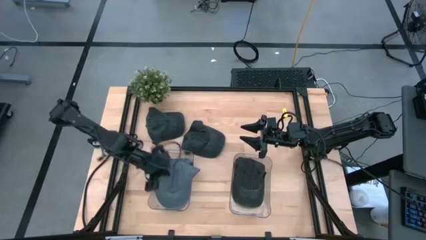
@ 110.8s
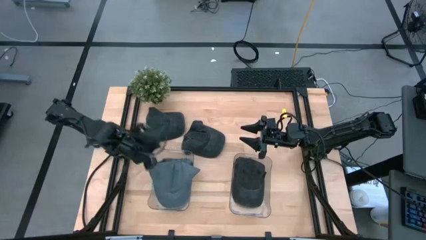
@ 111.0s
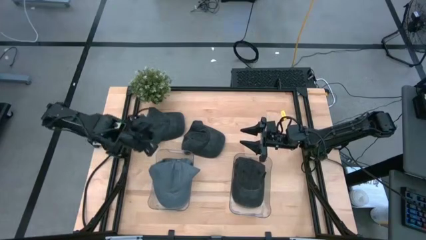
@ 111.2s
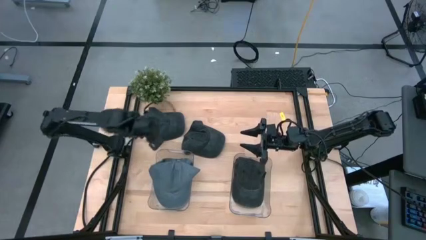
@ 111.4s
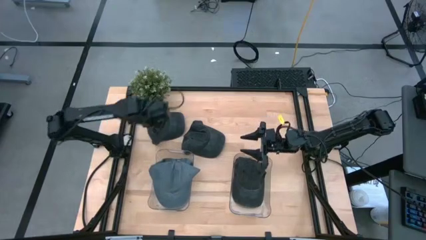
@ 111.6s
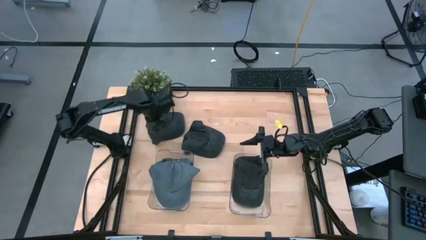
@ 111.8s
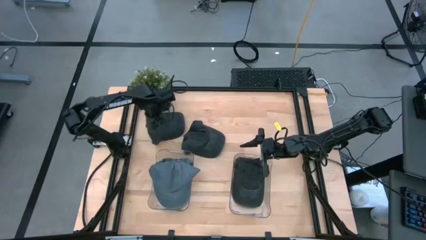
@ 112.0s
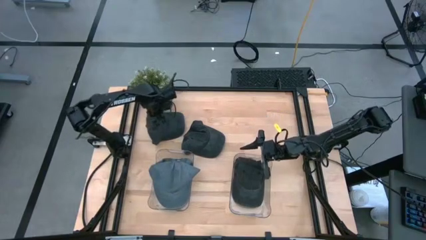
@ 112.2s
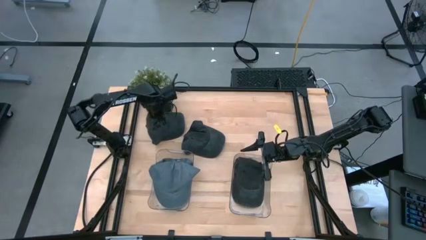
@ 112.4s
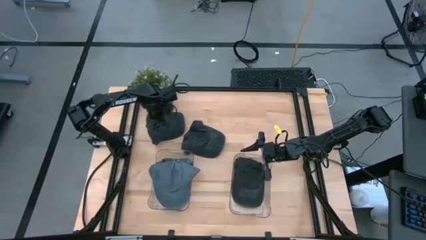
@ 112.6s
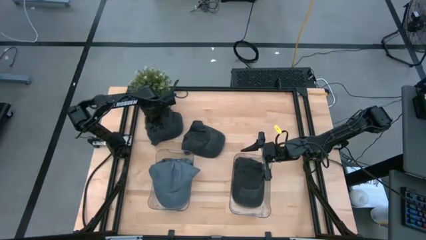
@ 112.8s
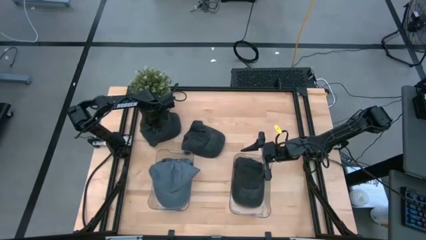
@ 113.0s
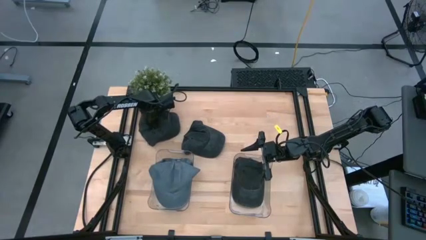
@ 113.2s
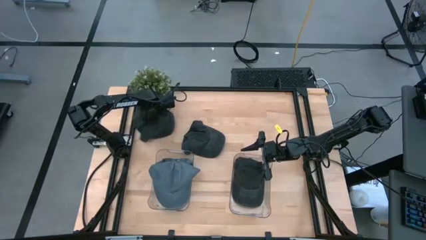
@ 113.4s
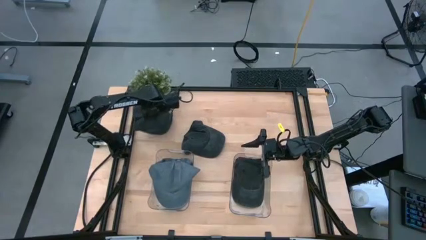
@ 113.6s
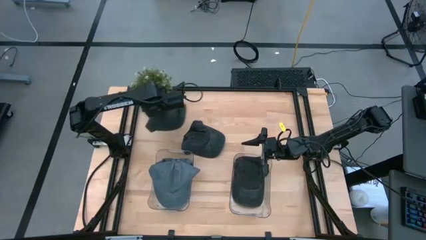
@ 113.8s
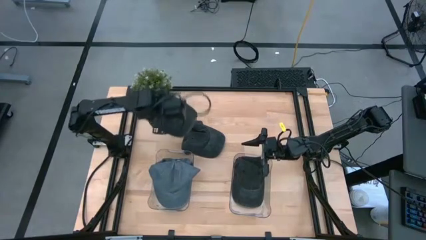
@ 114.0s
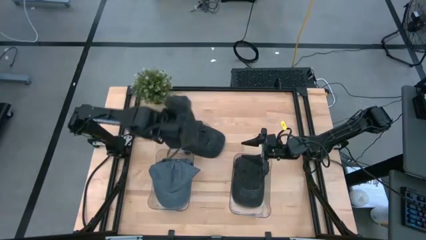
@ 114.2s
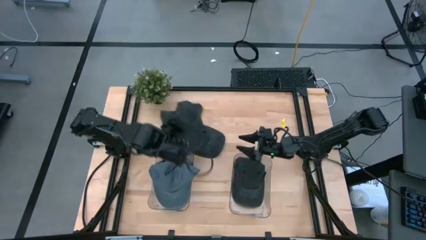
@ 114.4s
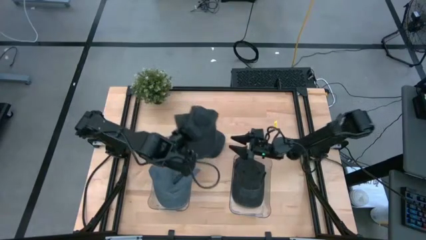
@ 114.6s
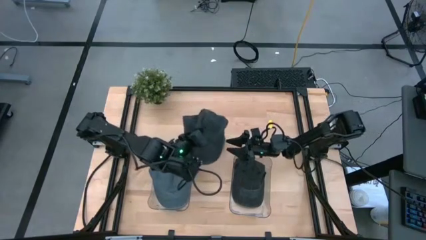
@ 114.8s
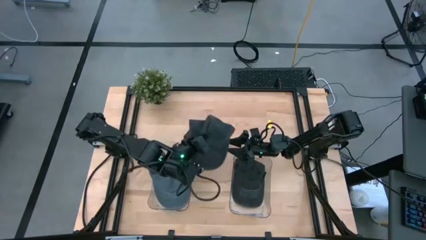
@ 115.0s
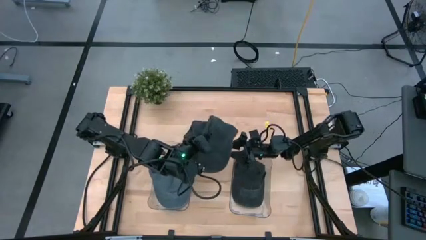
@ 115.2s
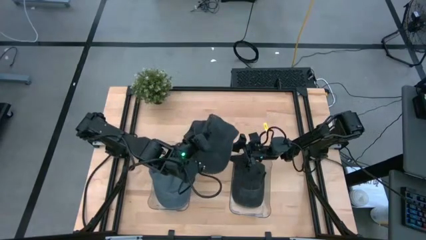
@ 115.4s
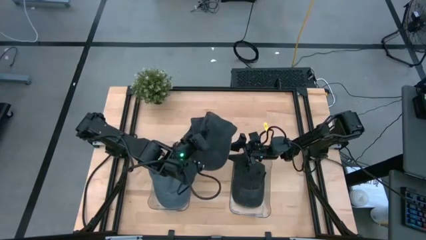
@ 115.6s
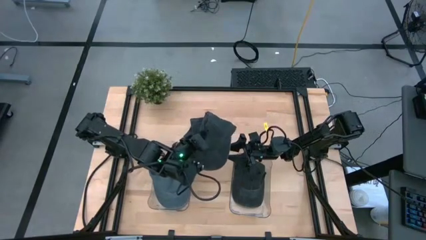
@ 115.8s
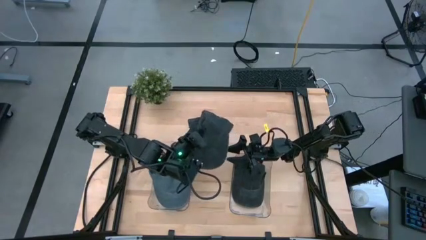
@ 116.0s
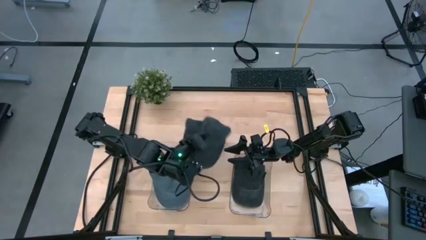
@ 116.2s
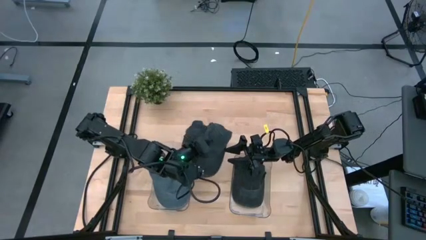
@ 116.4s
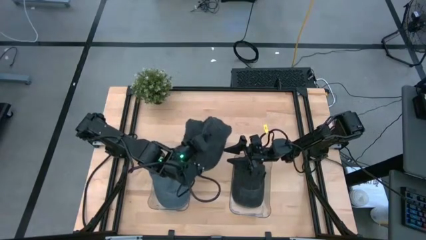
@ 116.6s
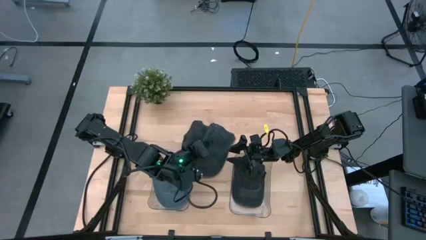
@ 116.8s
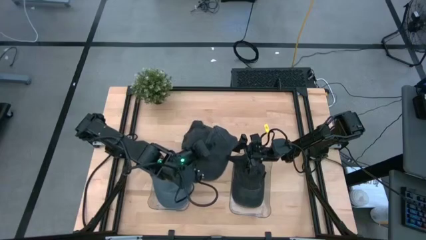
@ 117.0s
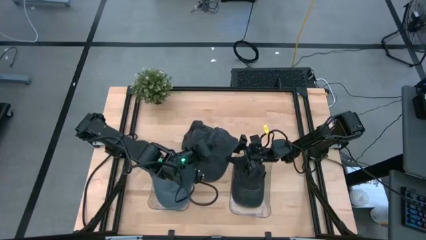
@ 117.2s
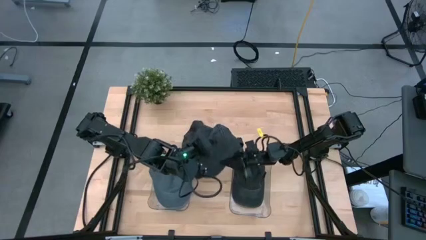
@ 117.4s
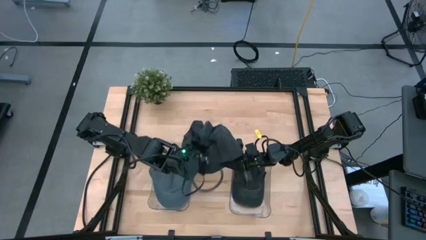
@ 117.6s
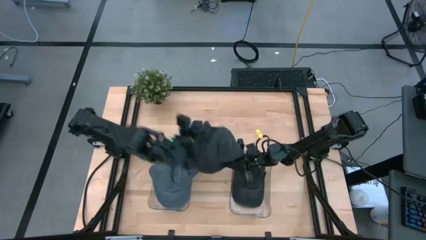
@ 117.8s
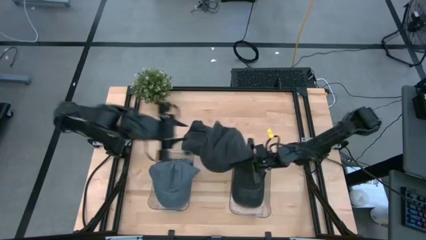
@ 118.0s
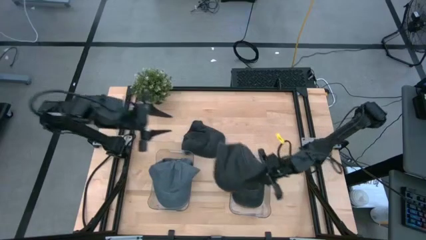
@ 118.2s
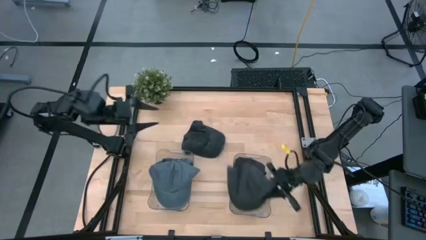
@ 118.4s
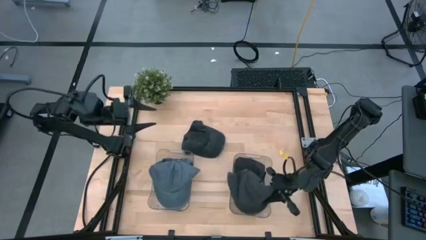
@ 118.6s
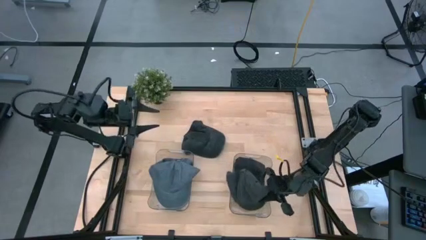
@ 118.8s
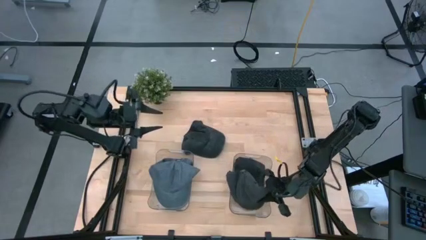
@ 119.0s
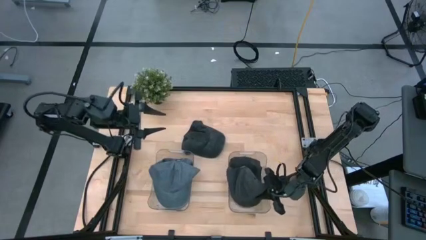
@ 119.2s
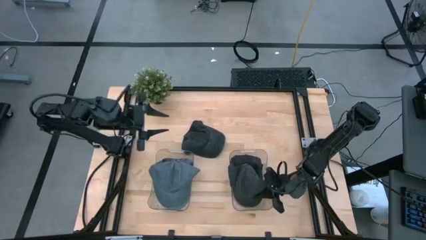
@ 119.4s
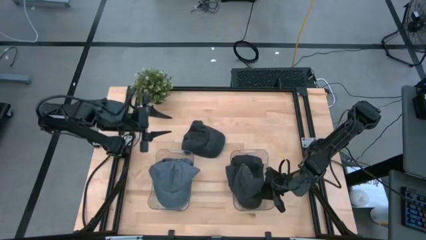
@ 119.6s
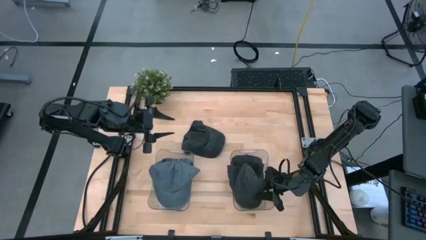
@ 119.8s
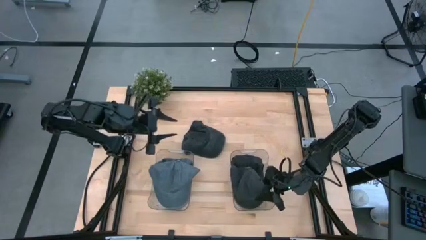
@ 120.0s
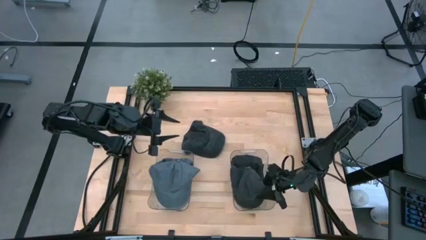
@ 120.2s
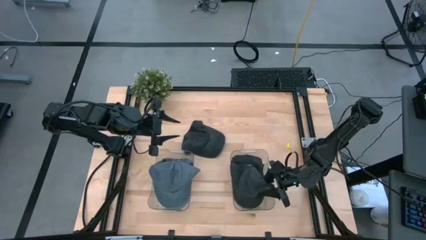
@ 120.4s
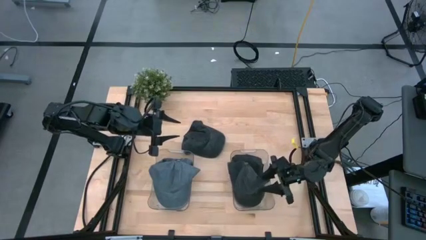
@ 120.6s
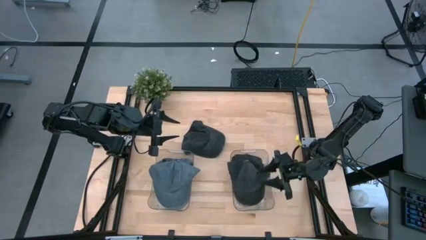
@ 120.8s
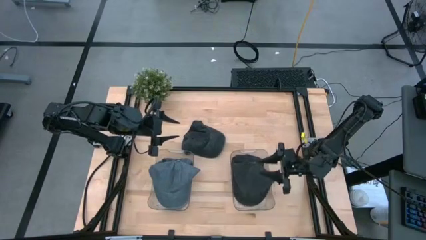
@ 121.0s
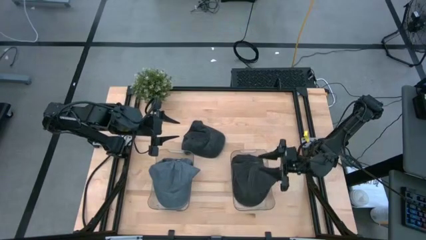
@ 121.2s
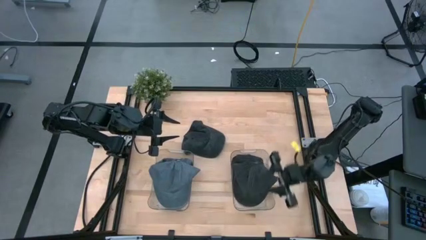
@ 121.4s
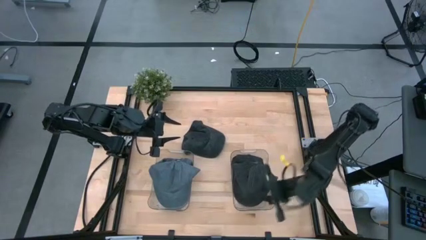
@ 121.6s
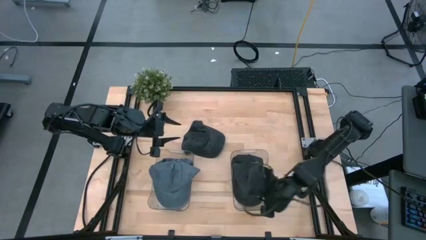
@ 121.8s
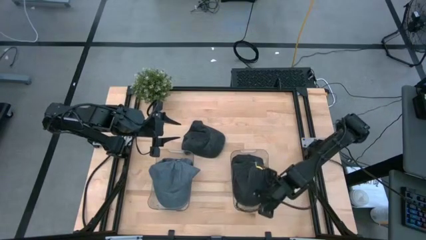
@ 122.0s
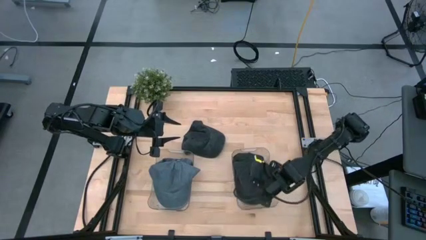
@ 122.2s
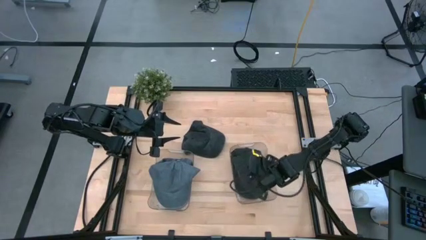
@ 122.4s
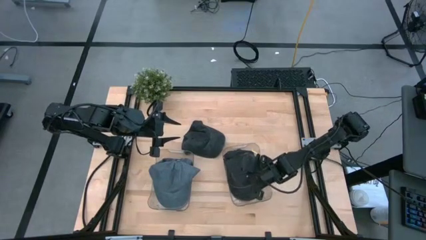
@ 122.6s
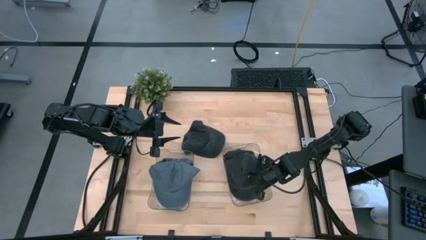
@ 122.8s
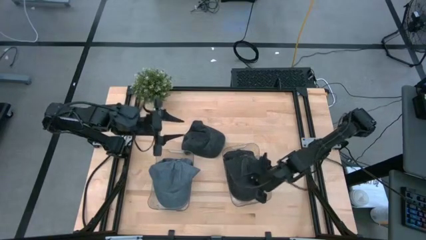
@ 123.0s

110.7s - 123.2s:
Task: Pick & Place hat
Put the left black cap into the right transparent bin

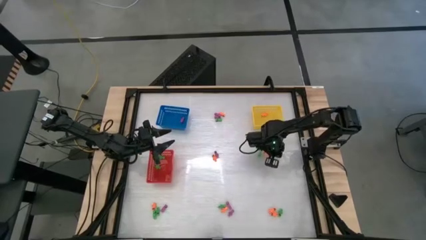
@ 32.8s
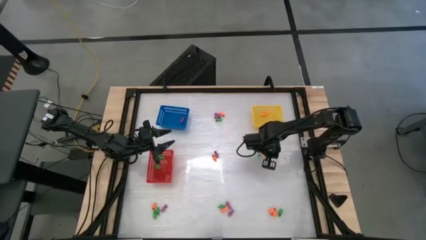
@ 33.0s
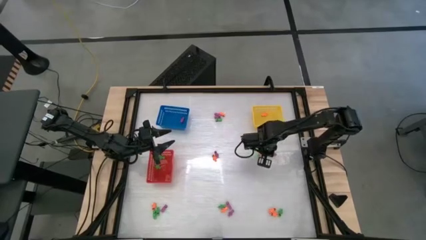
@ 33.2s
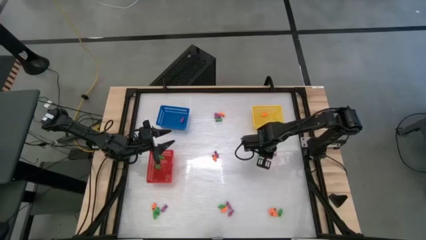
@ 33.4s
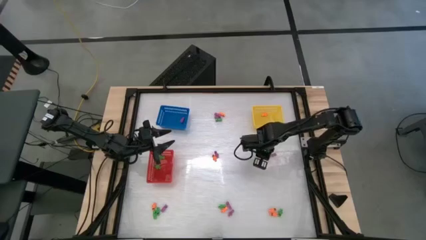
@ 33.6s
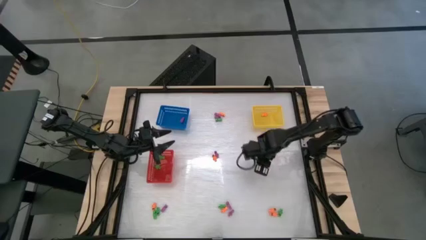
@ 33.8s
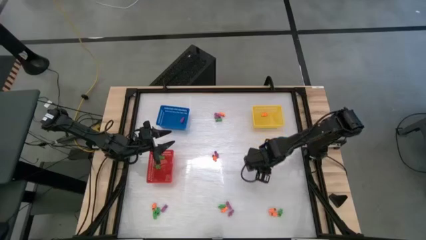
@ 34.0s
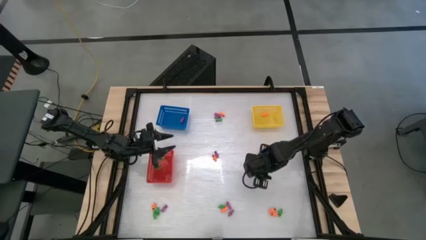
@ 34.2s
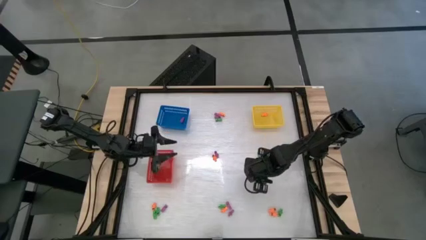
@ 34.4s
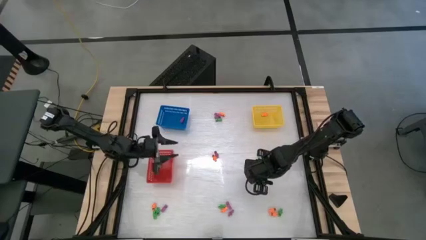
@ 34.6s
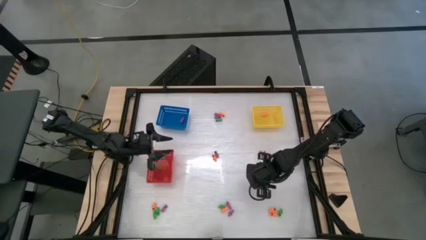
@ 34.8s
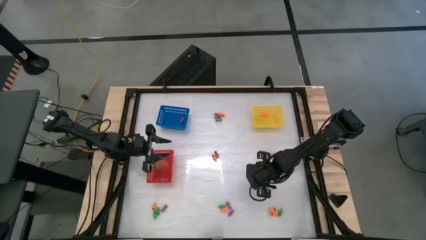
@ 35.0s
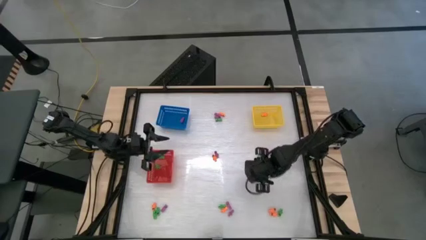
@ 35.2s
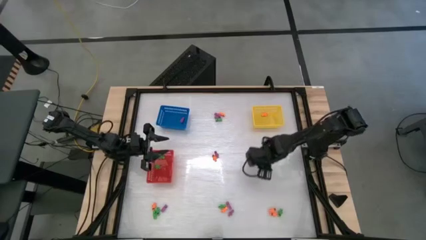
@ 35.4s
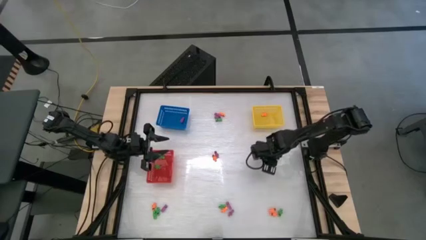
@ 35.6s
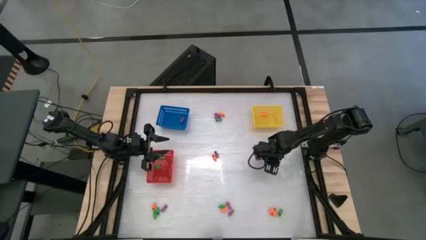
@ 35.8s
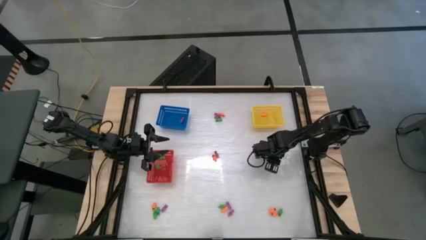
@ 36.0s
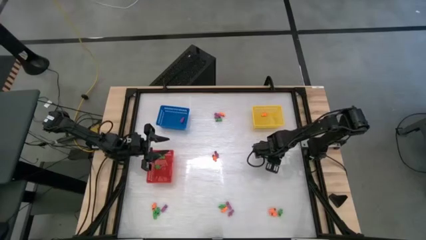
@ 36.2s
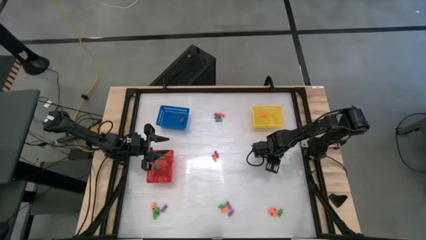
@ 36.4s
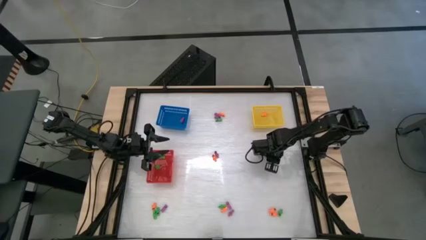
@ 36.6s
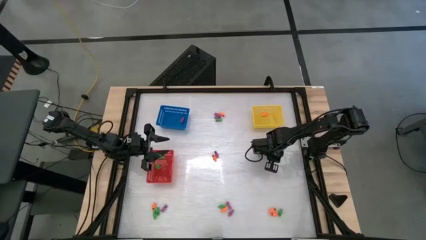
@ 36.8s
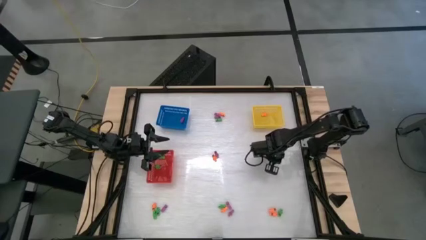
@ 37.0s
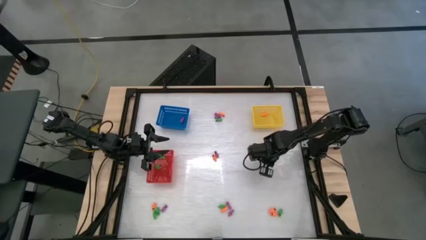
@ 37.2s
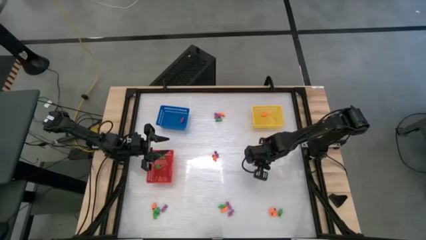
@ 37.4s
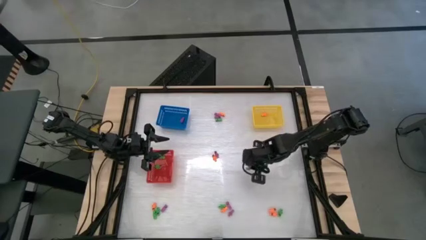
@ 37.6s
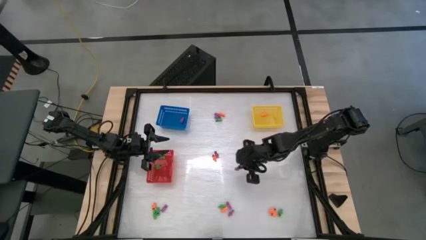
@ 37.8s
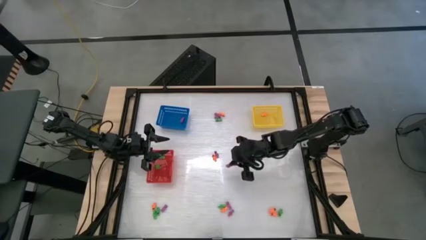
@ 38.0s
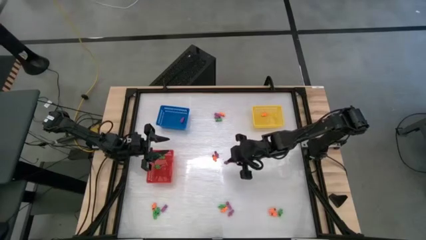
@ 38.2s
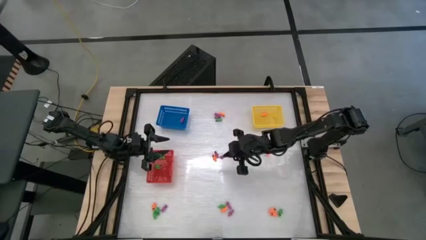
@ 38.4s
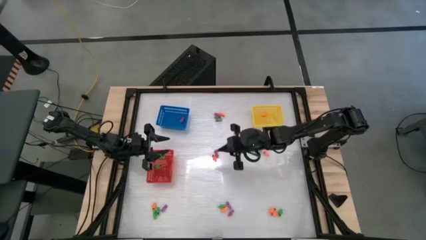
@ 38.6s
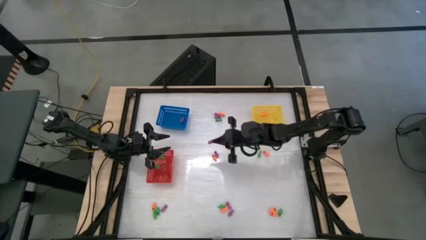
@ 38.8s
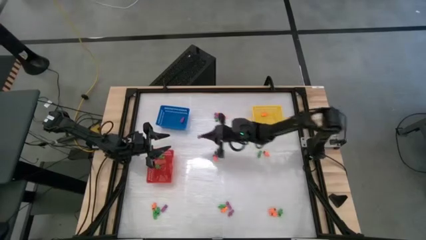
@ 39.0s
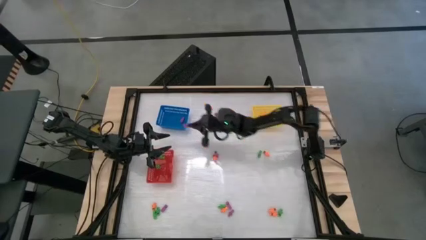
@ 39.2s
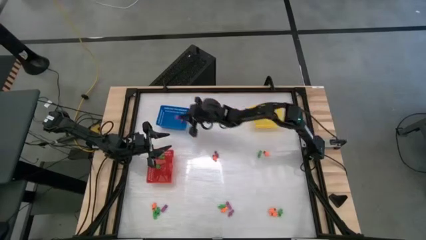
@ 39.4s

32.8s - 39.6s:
Task: Sort Halloween decoration
Put the violet skeleton toy into the blue bin
